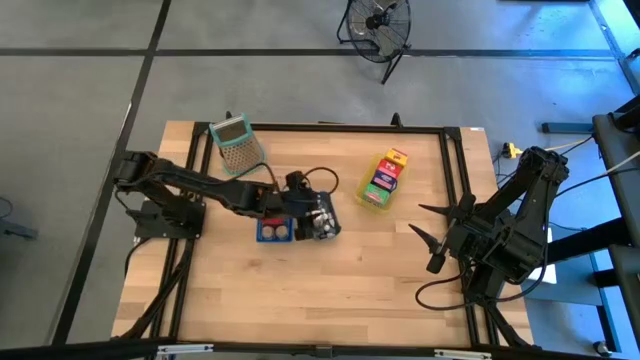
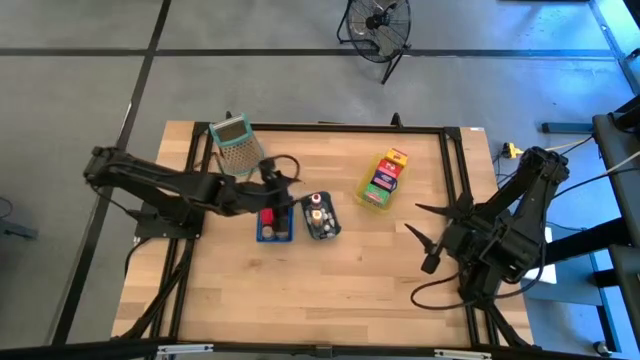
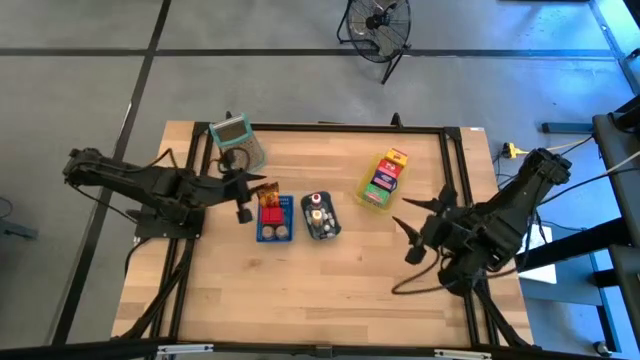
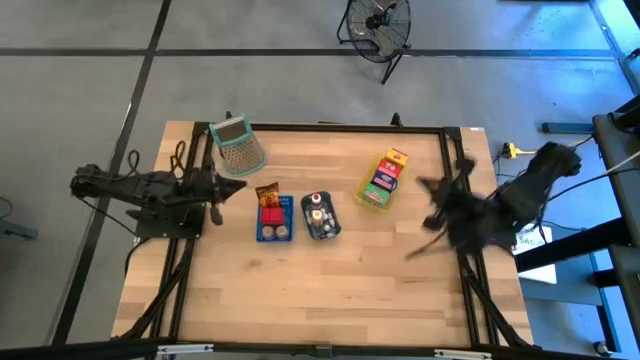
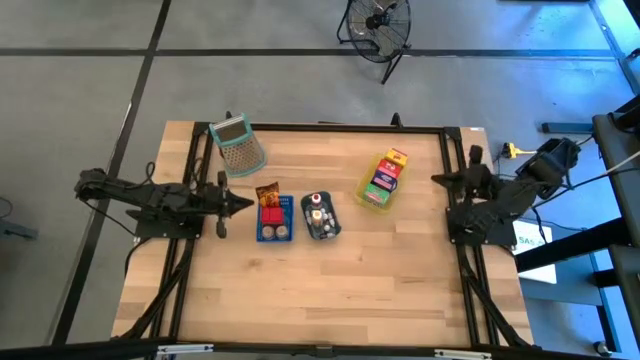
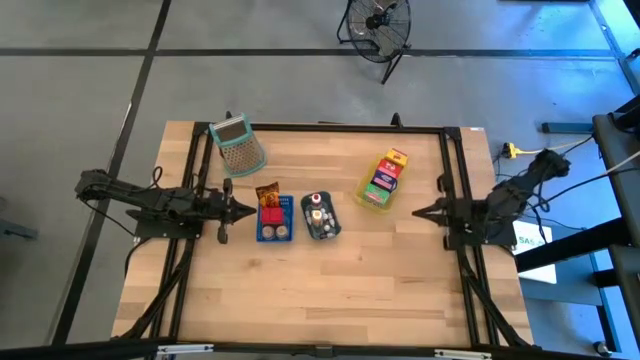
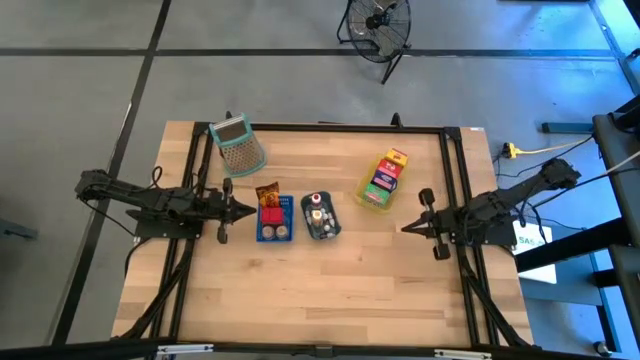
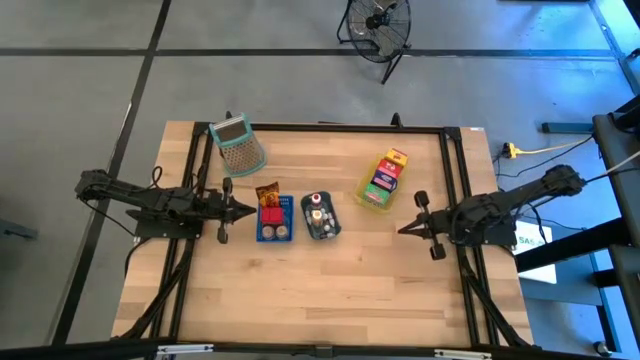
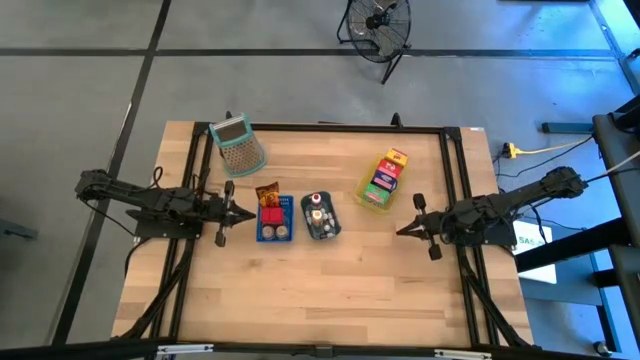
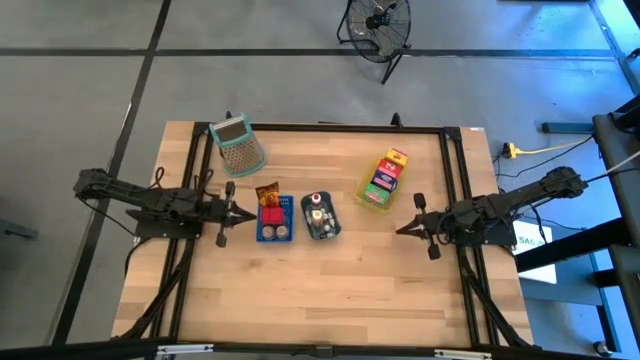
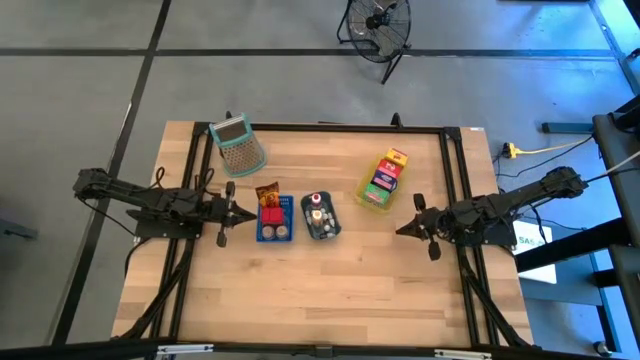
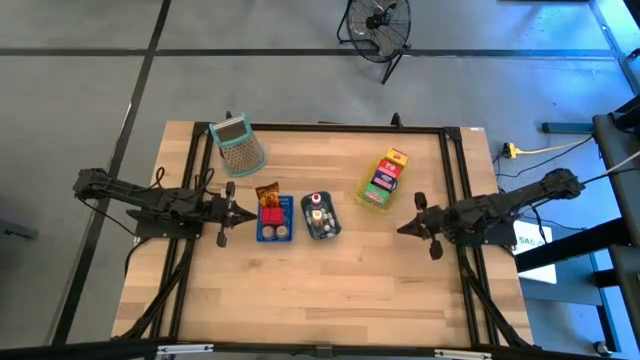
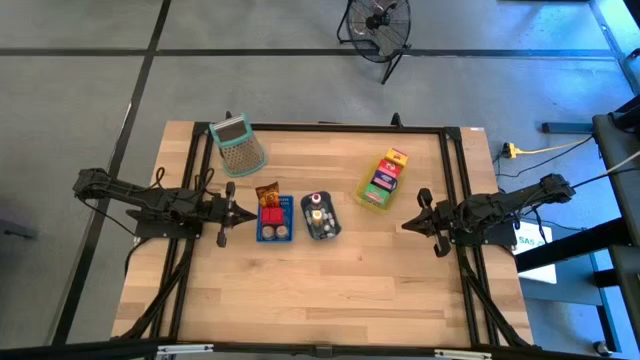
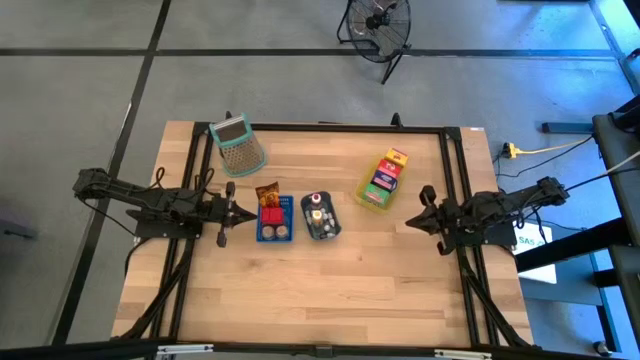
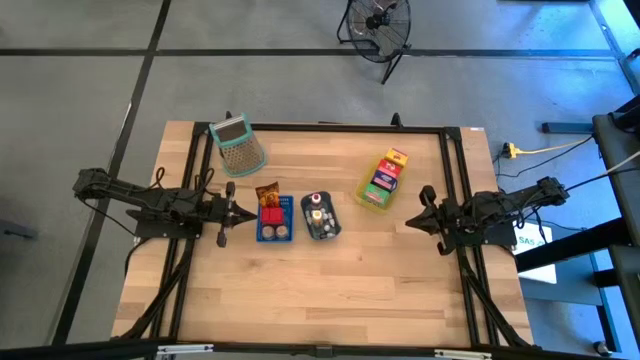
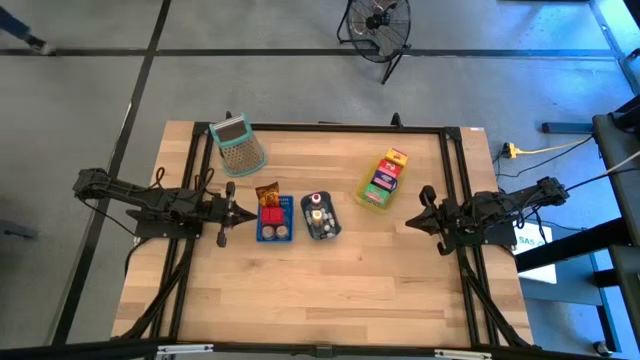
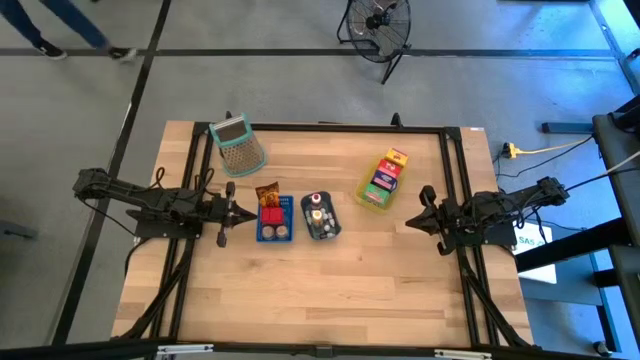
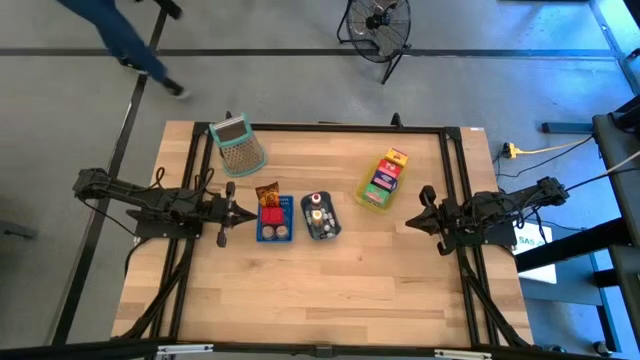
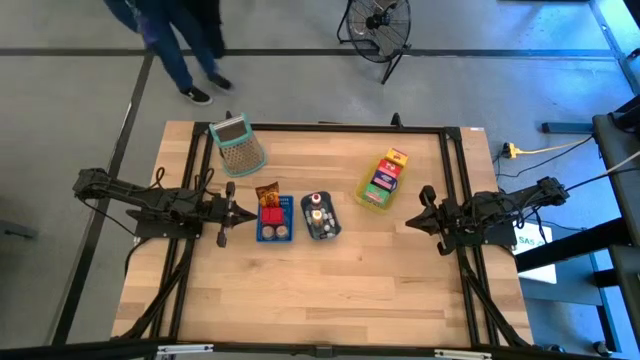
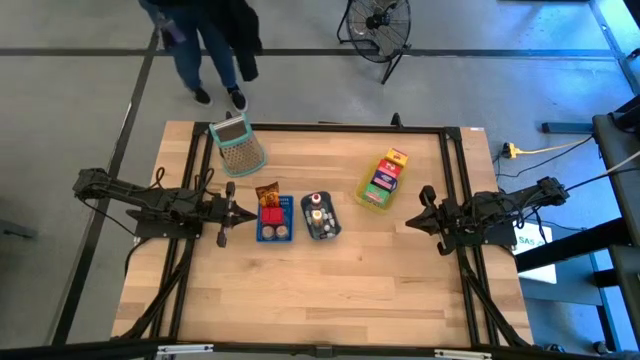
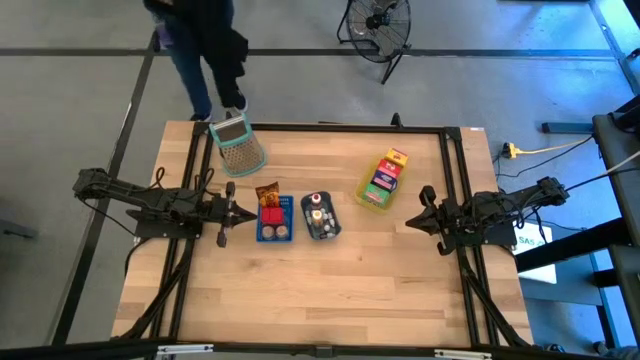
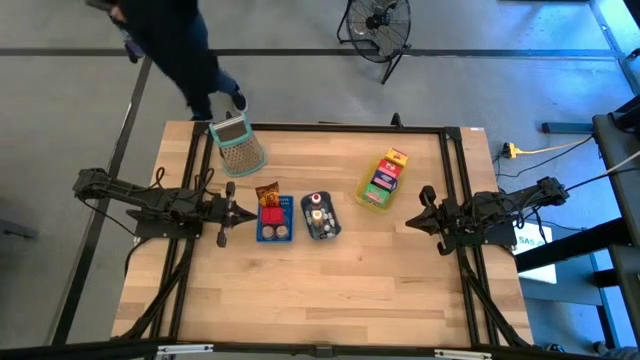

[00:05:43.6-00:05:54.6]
Task: Pick & Place Kitchen Items
Return to Home Position

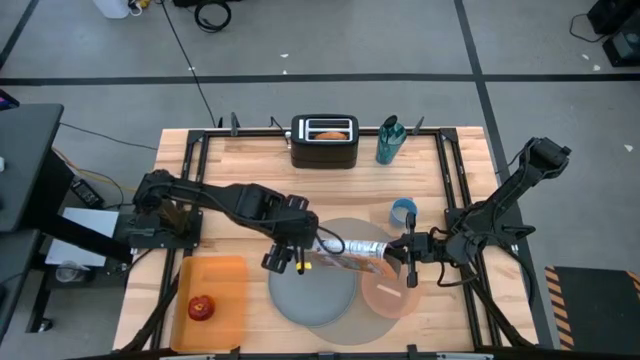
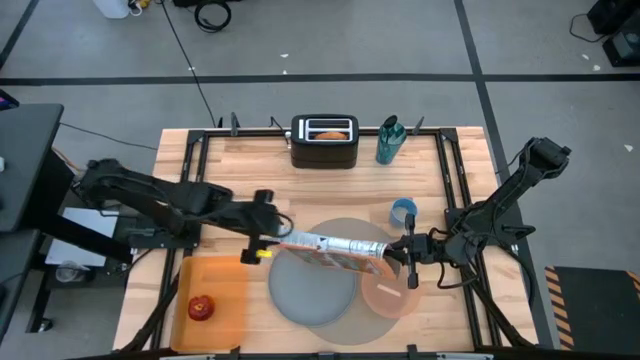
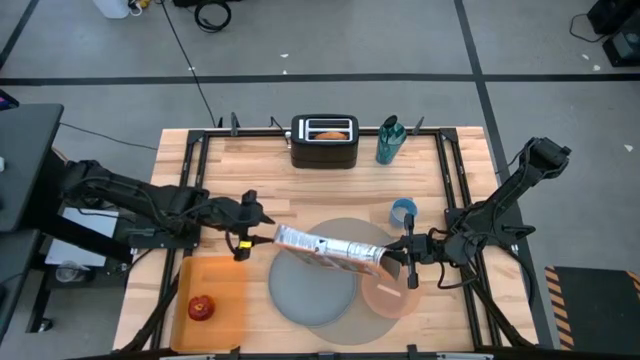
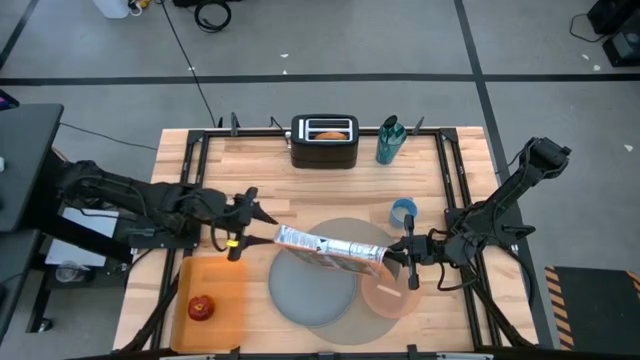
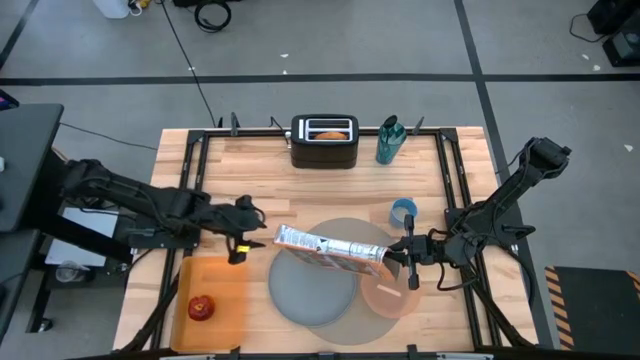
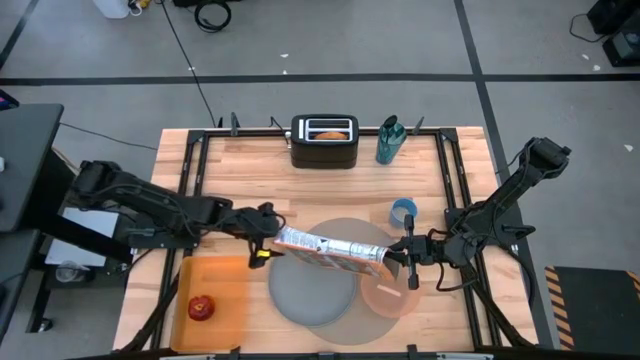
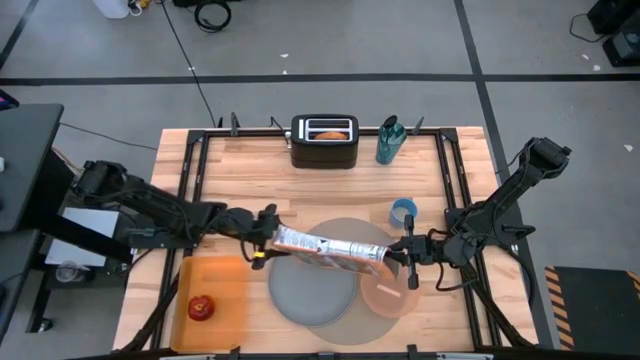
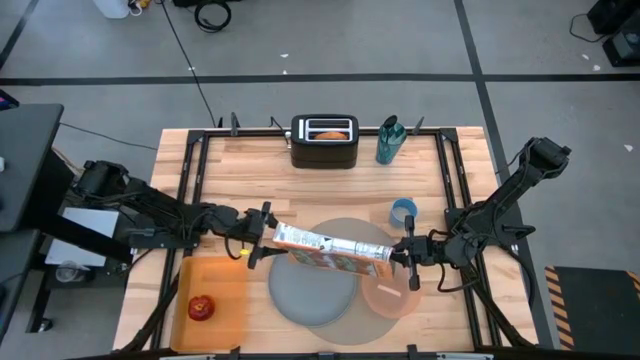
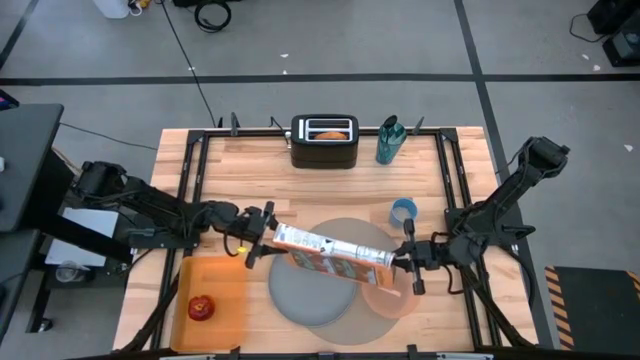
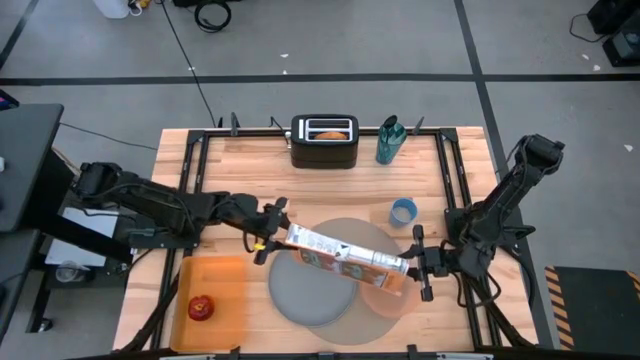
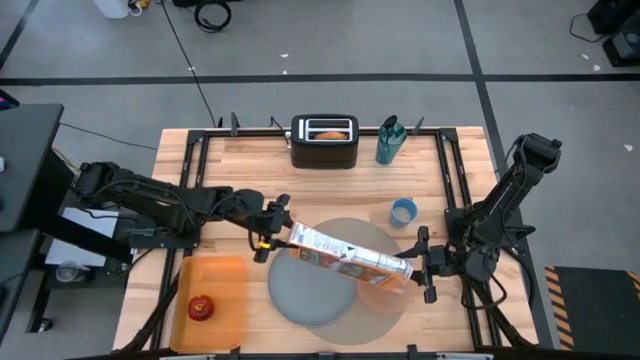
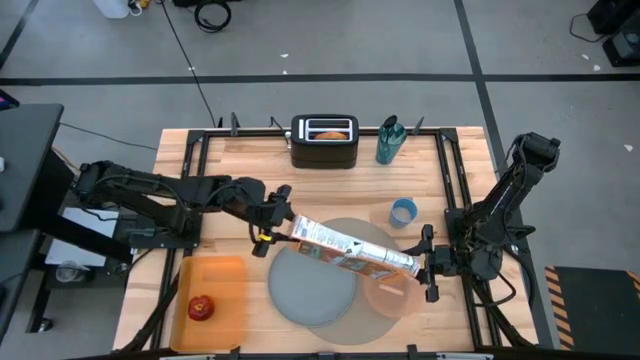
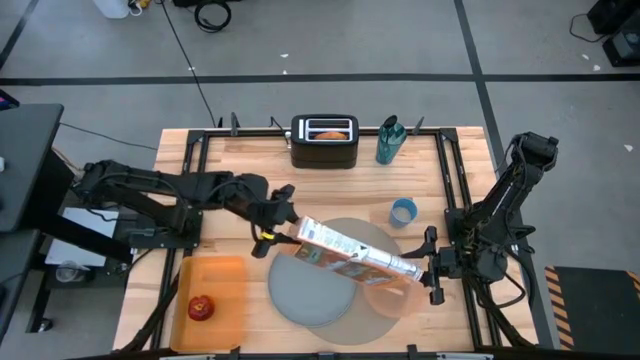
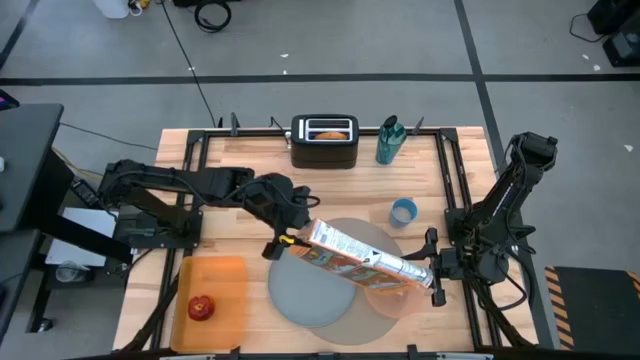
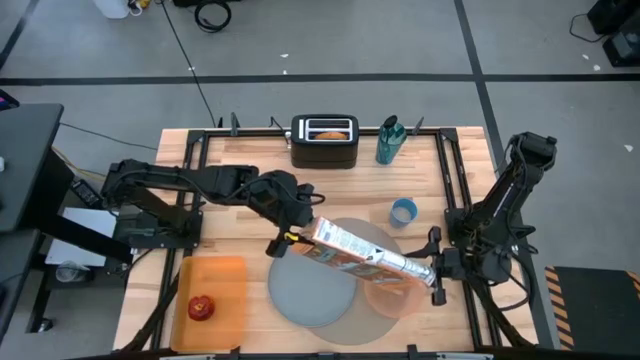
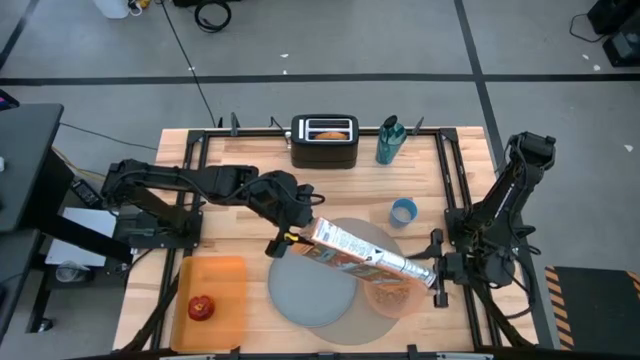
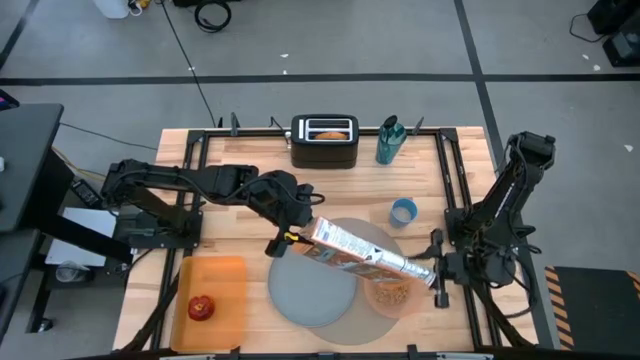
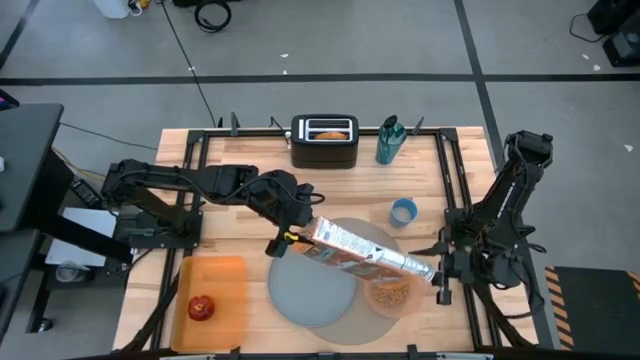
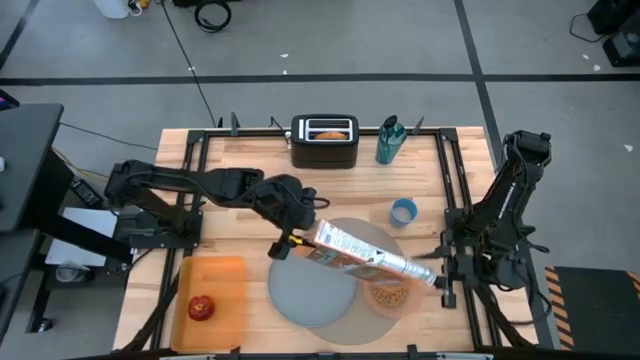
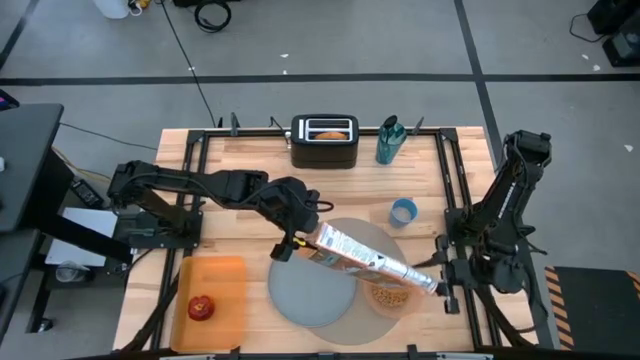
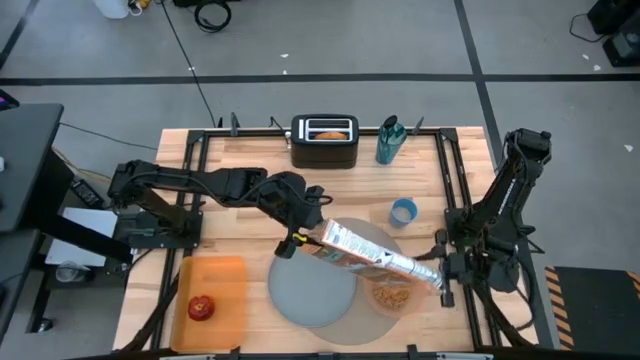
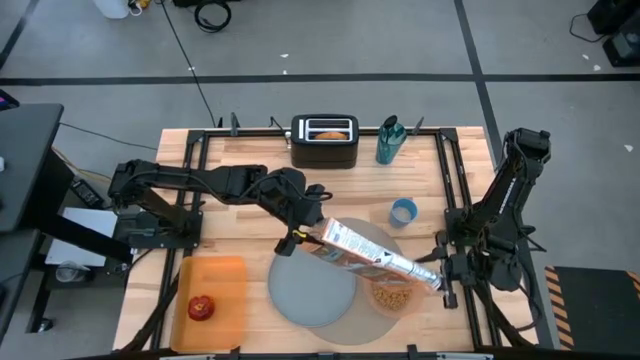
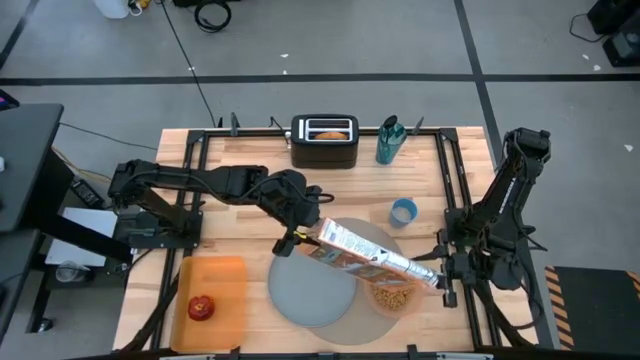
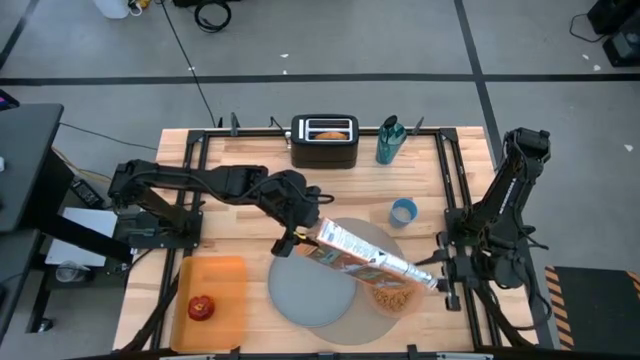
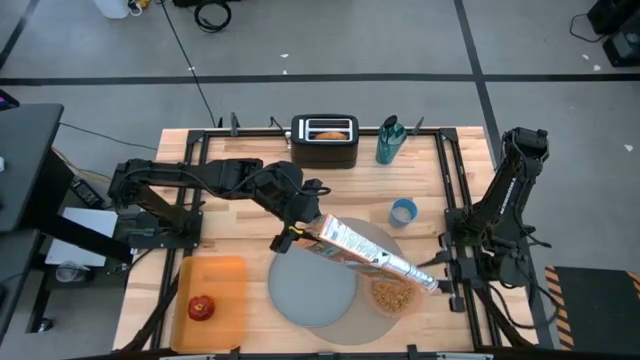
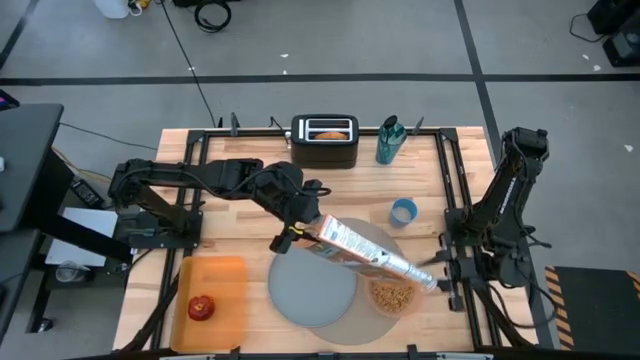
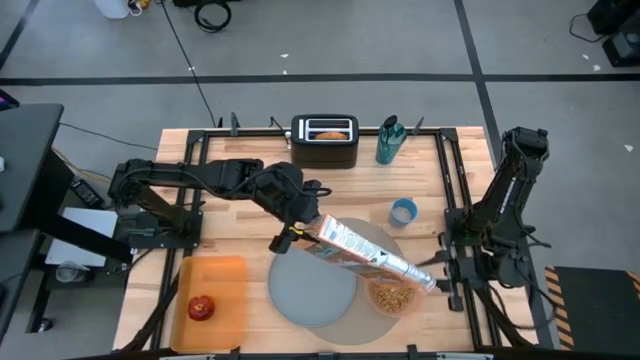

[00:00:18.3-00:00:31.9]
Task: Arrange a breakfast setting
Pour the cereal from the yellow cereal box into the orange bowl on the brown placemat
